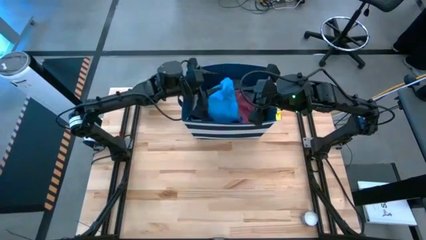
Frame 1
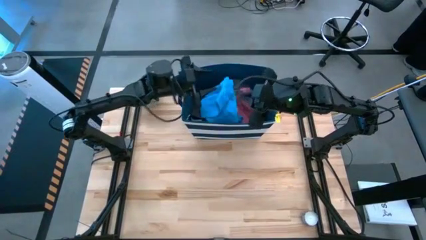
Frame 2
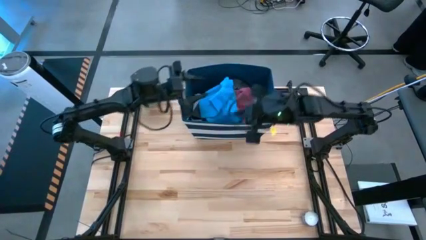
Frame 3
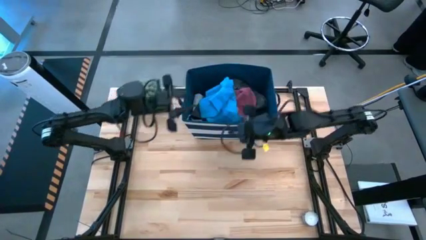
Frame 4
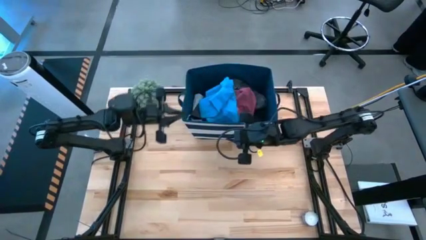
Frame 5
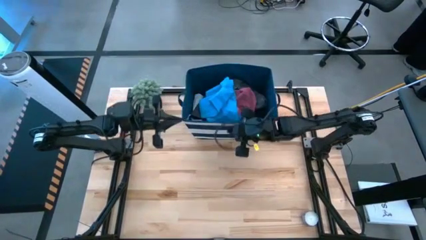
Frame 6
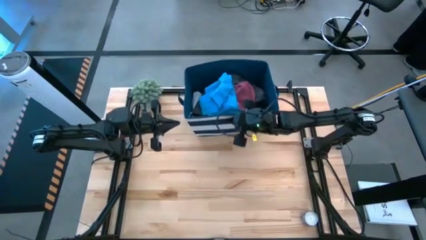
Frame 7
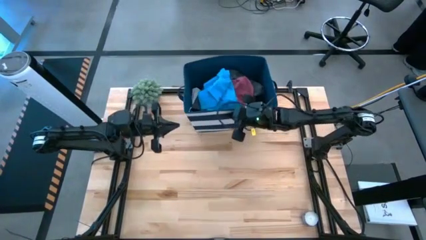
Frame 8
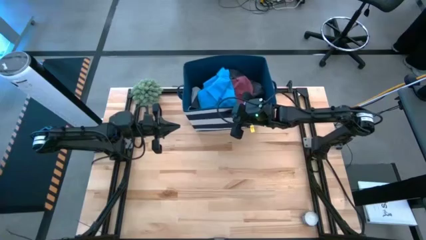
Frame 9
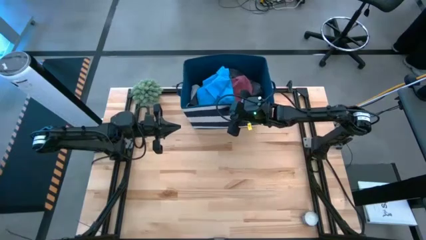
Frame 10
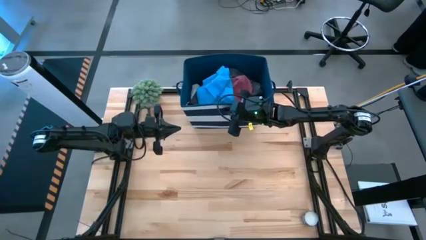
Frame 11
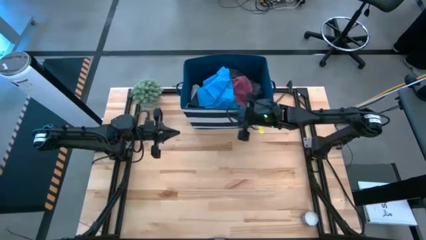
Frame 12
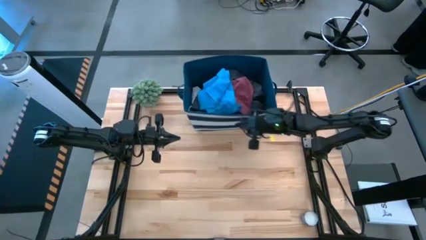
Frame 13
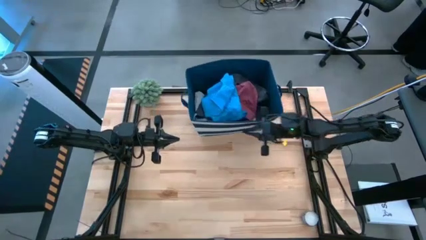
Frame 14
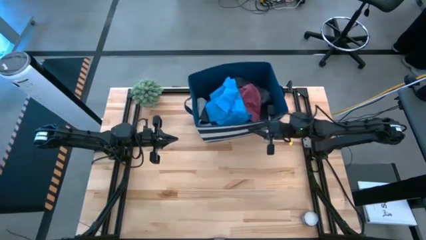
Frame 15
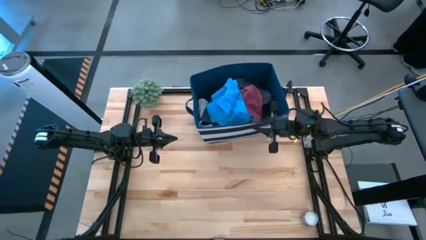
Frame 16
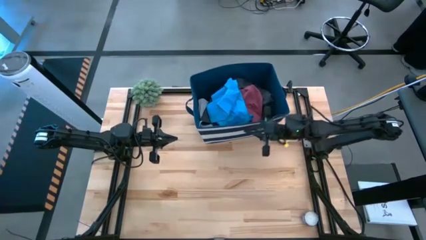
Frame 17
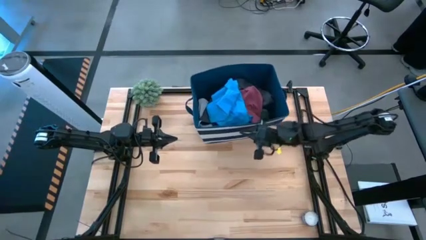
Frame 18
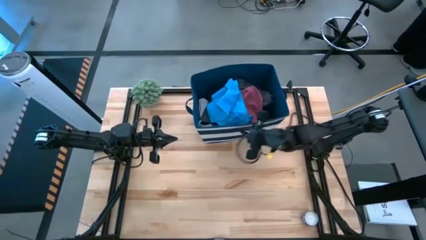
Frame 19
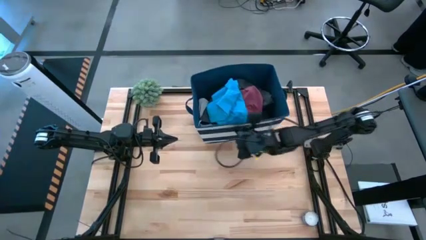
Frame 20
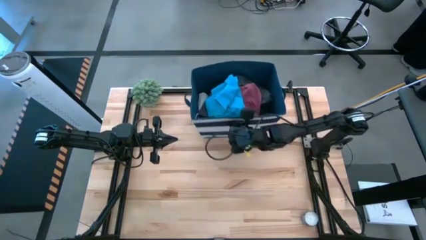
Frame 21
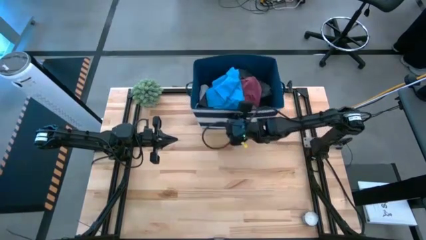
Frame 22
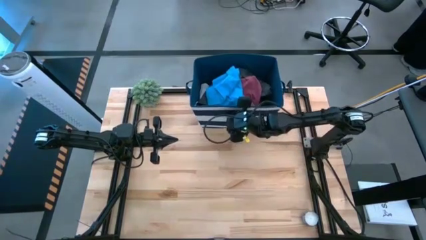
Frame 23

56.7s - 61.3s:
Task: Sort clothes
Adjust the blue laundry organizer

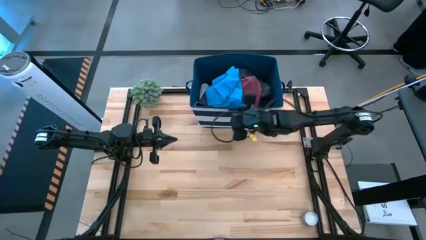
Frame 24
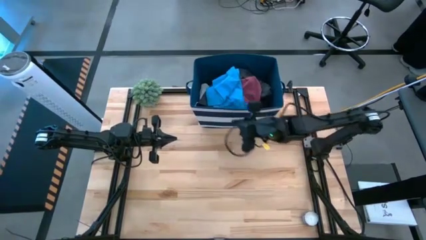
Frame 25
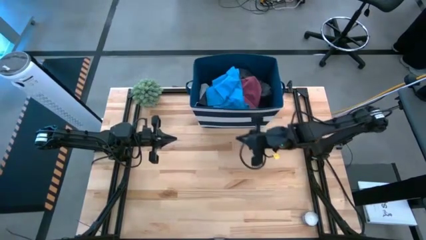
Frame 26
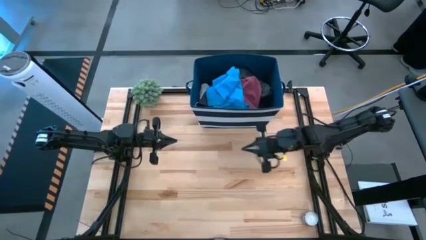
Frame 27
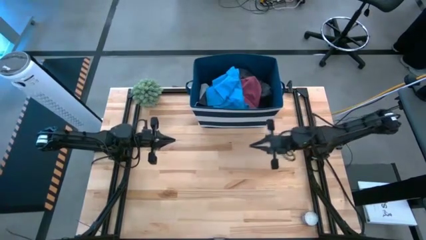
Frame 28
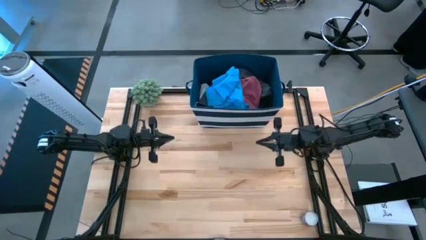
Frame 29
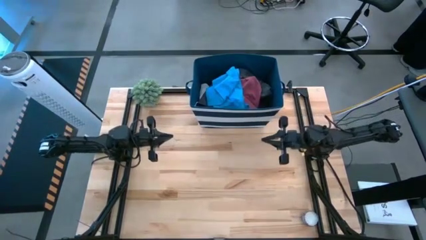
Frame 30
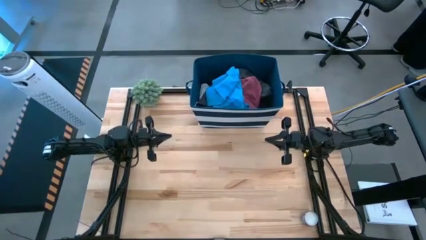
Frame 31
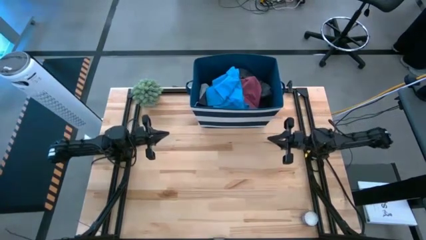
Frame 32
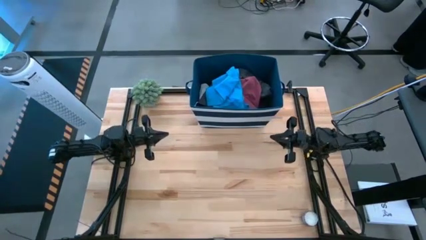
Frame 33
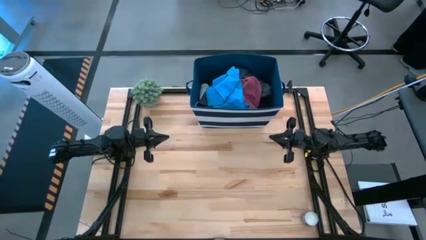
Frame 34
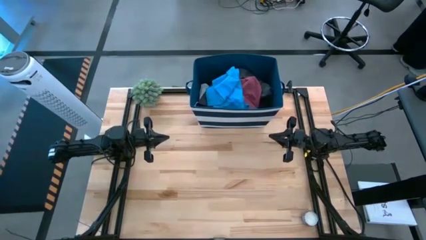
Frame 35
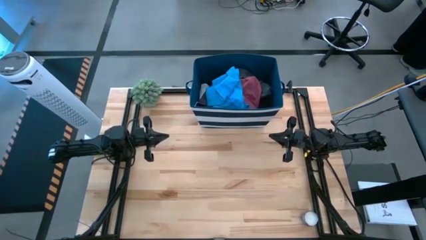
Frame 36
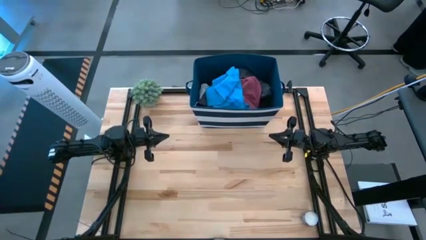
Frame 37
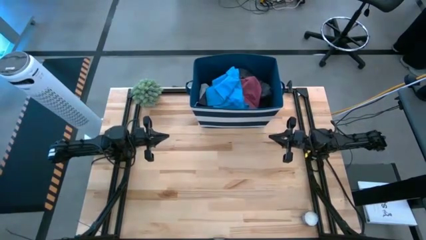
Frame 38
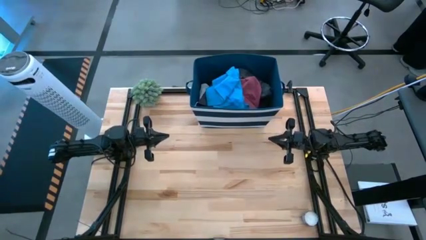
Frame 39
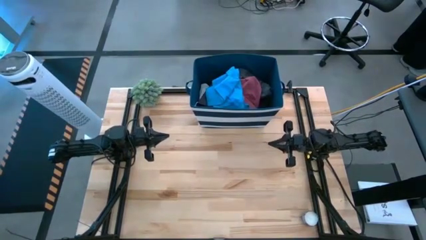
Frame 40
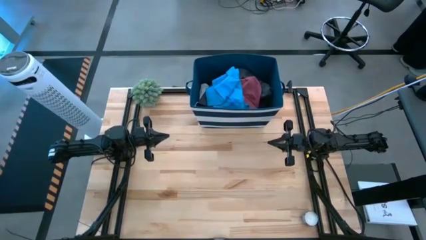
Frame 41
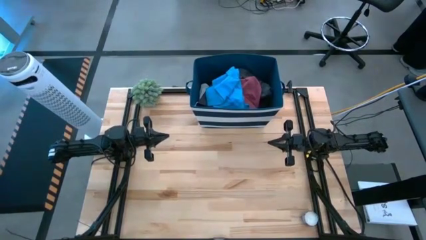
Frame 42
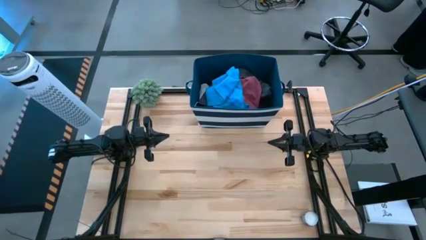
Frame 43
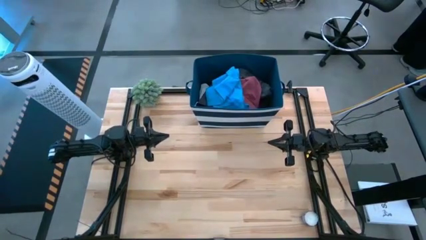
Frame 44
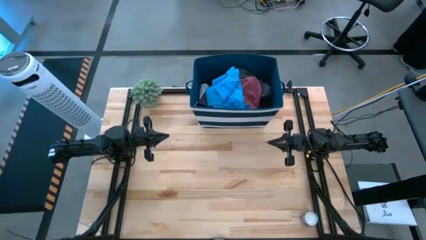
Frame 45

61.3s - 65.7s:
Return to Home Position

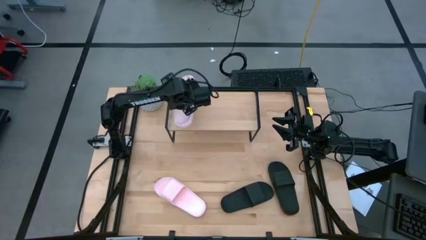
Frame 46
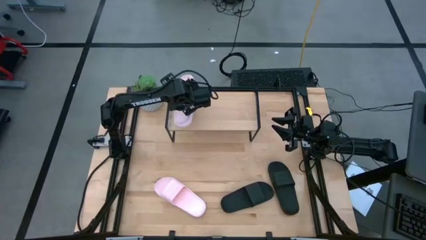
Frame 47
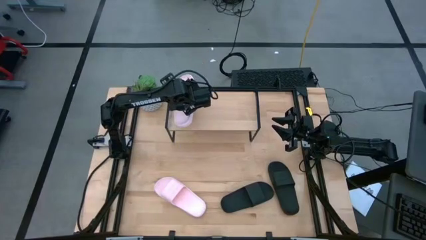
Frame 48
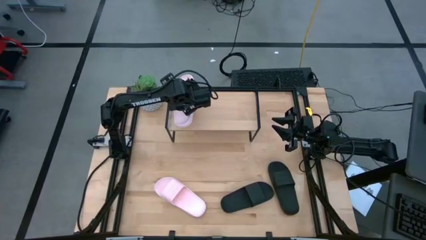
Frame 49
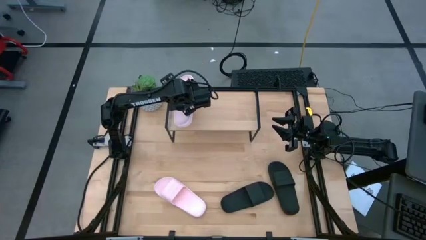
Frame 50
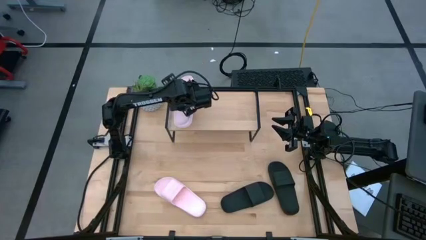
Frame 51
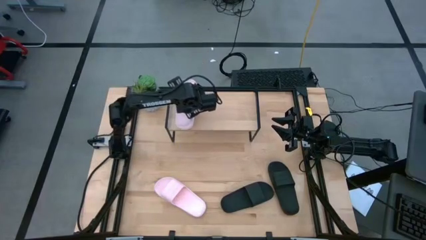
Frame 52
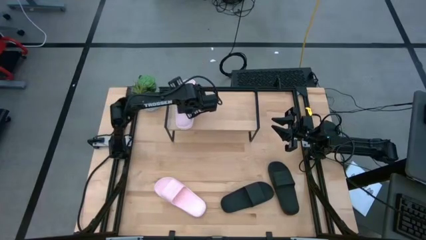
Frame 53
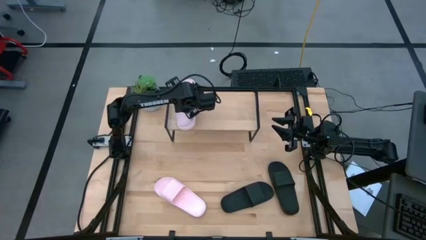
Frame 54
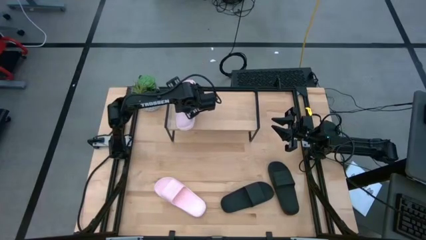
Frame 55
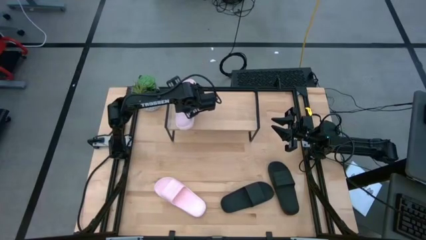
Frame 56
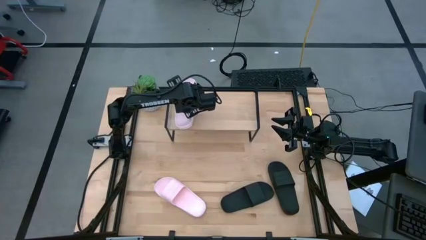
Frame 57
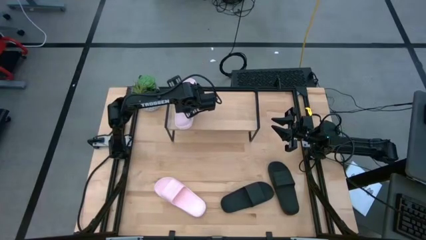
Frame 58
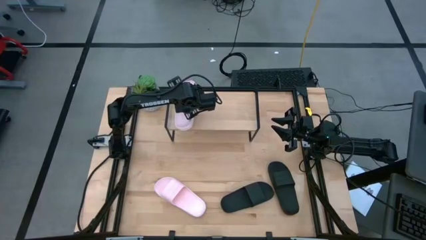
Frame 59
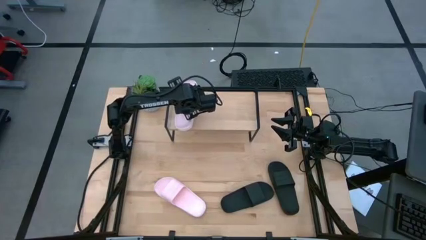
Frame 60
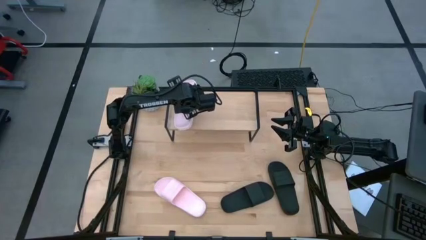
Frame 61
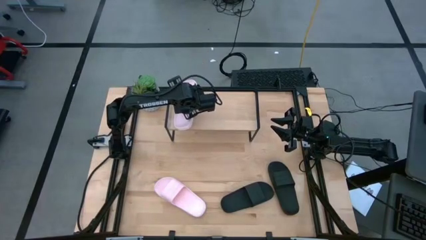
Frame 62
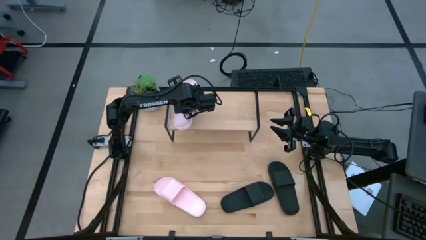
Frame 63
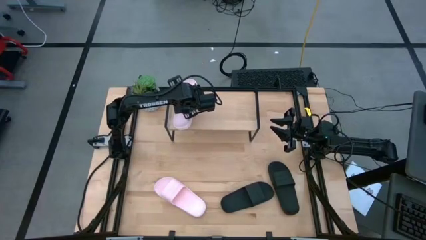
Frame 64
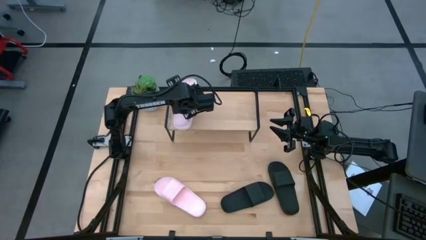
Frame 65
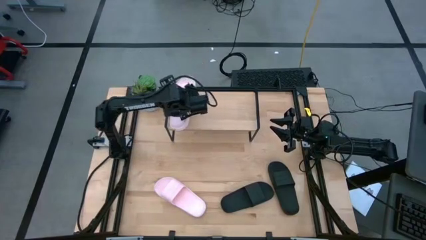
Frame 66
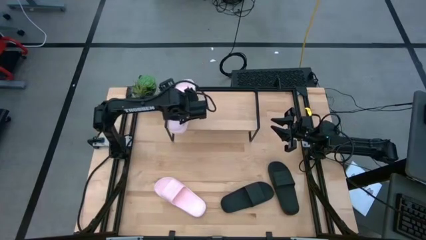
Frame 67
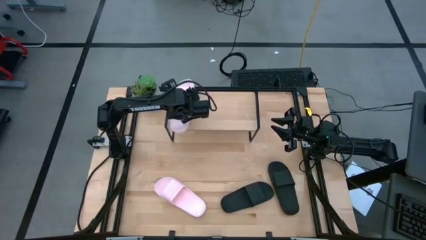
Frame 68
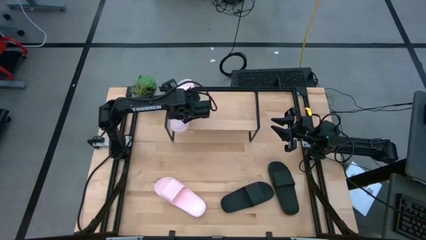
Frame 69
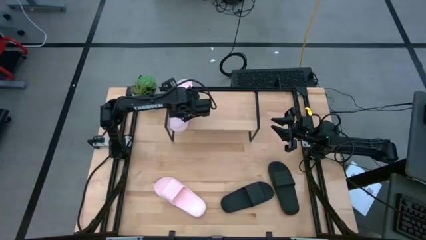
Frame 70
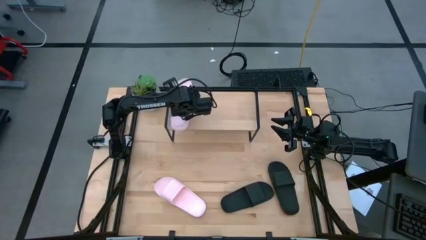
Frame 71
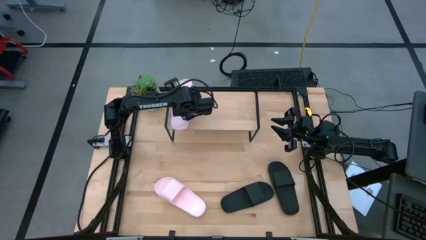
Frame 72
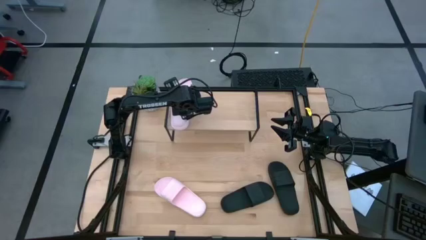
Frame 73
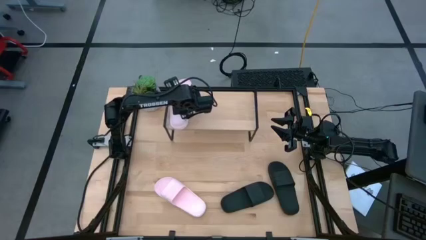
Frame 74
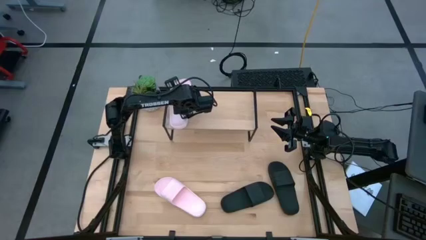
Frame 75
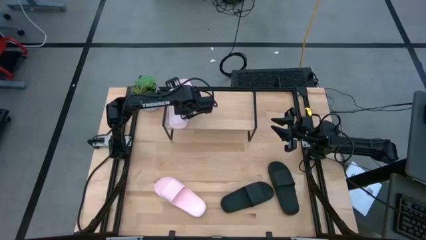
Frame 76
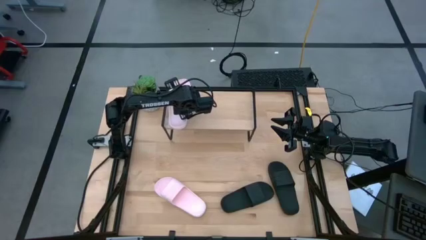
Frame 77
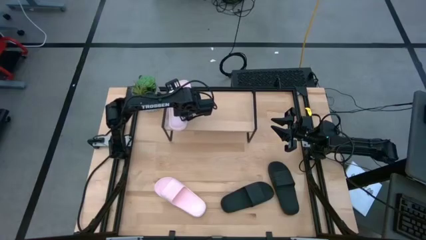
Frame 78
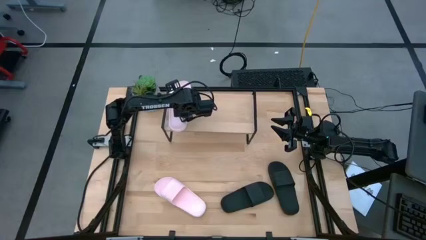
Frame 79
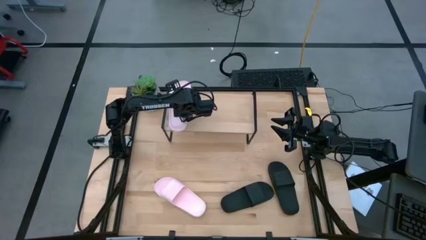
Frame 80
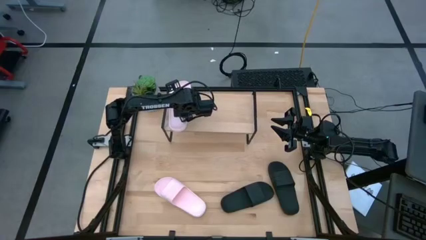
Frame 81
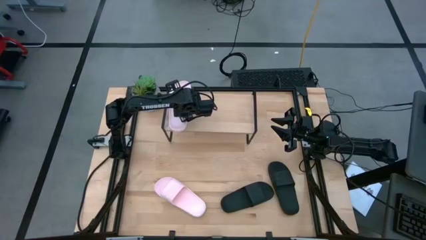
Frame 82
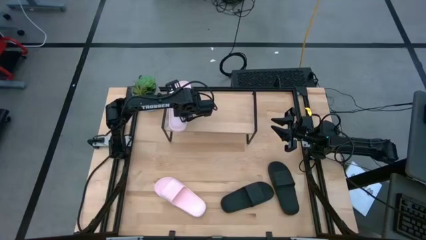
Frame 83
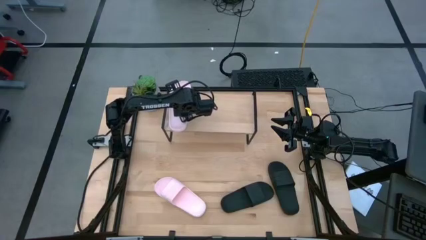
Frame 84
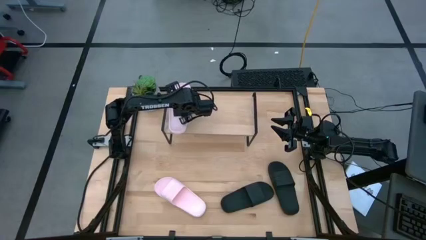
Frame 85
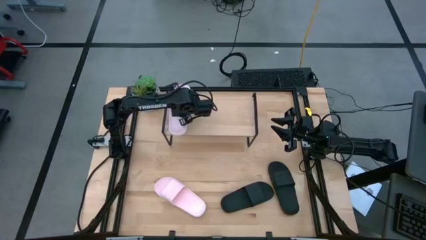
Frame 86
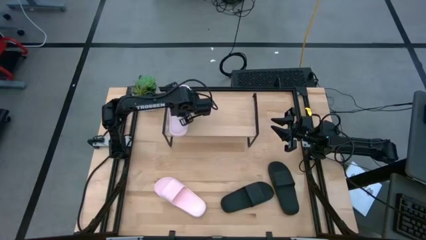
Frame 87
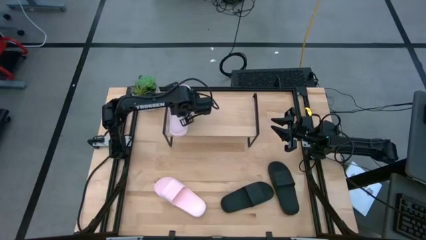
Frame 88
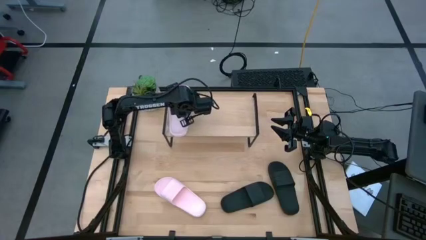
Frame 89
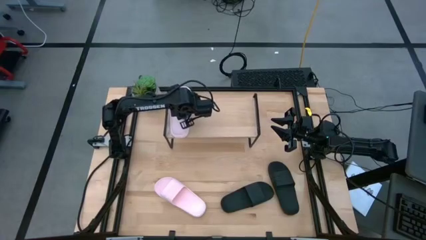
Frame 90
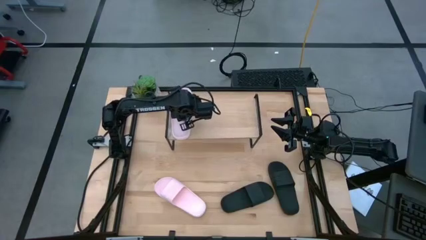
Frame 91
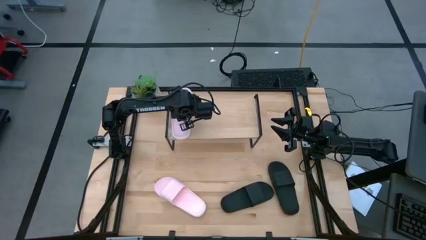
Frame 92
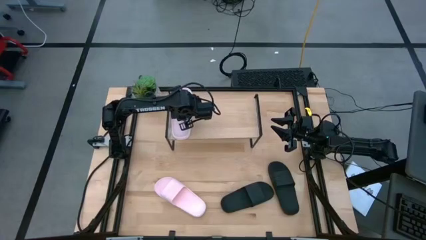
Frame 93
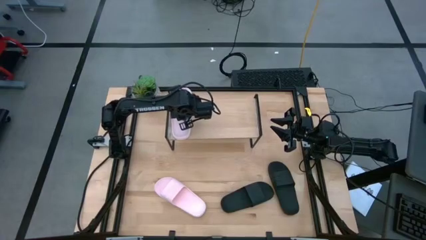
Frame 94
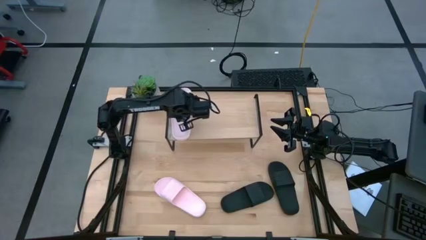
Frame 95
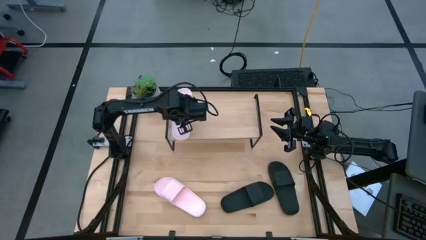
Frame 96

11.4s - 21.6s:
Task: Pick and place slides into the shelf
Put the left pink slipper on the shelf
